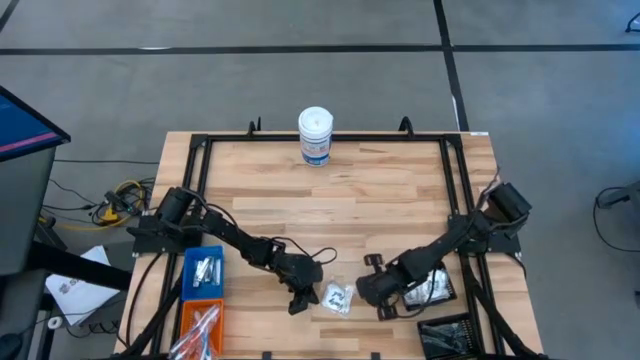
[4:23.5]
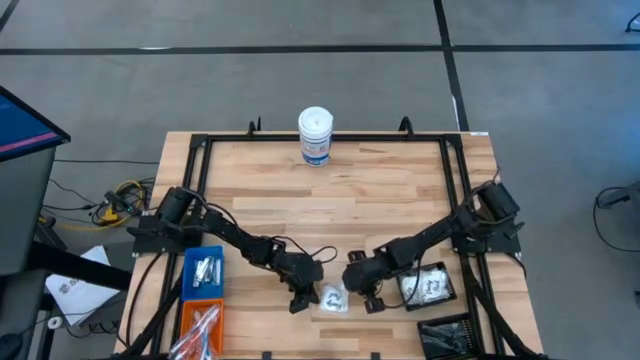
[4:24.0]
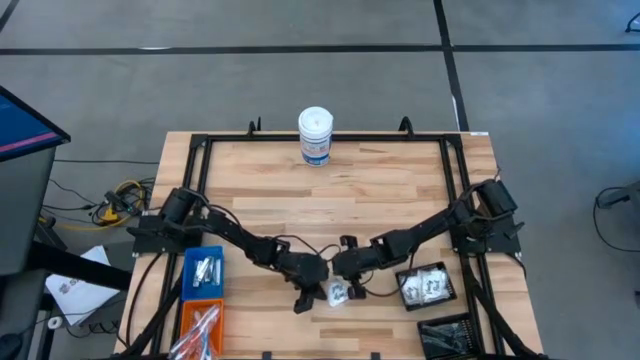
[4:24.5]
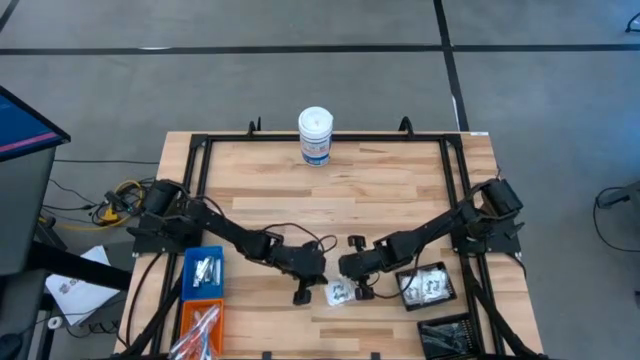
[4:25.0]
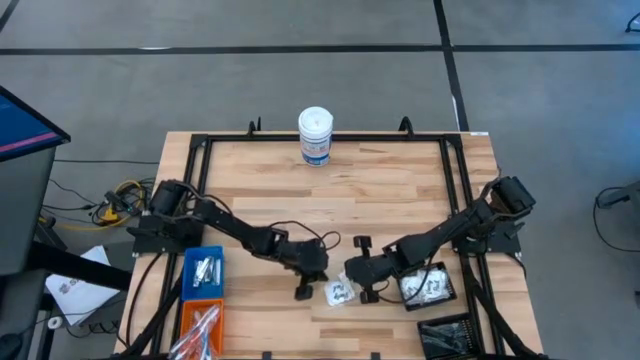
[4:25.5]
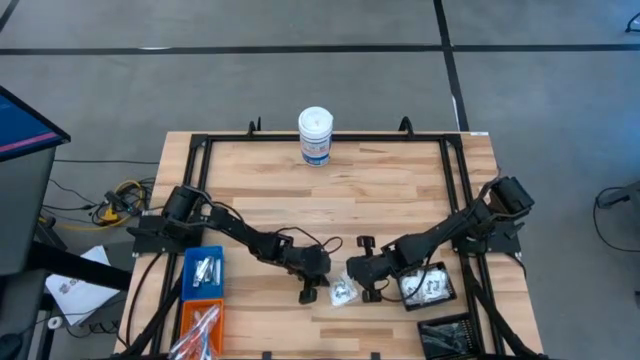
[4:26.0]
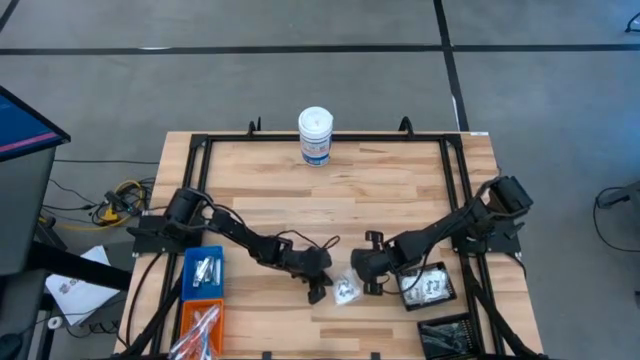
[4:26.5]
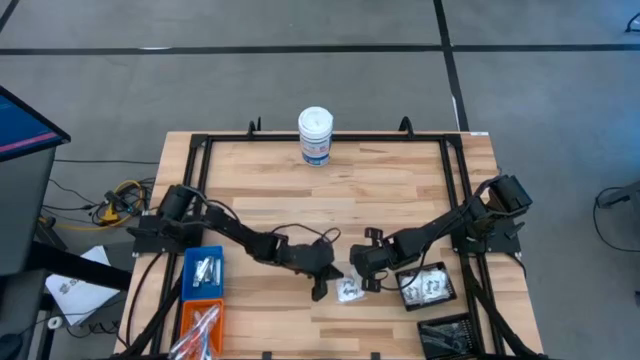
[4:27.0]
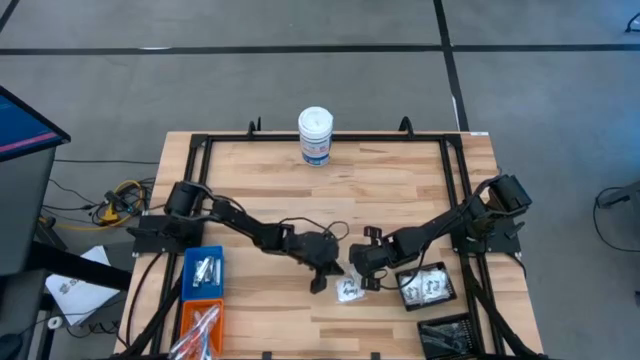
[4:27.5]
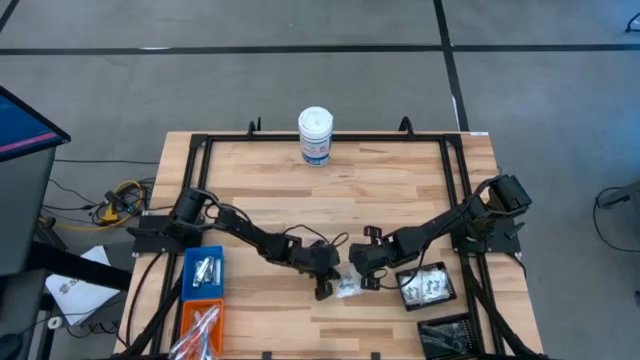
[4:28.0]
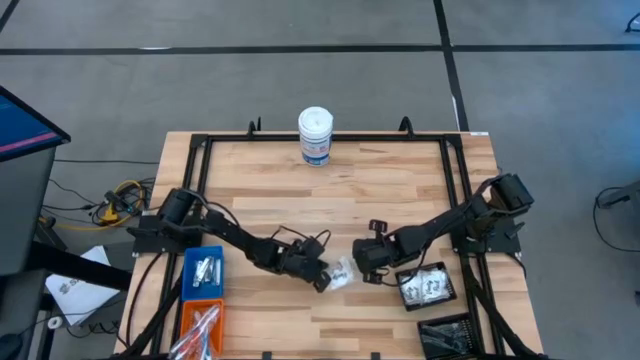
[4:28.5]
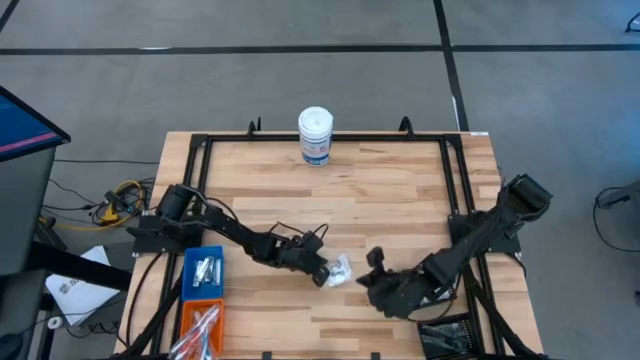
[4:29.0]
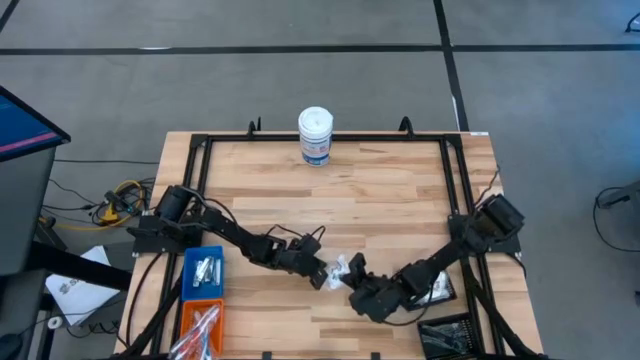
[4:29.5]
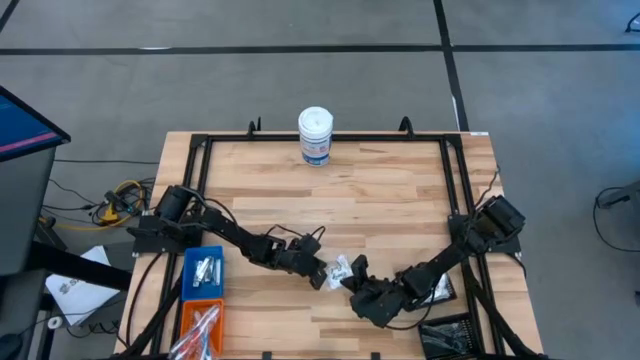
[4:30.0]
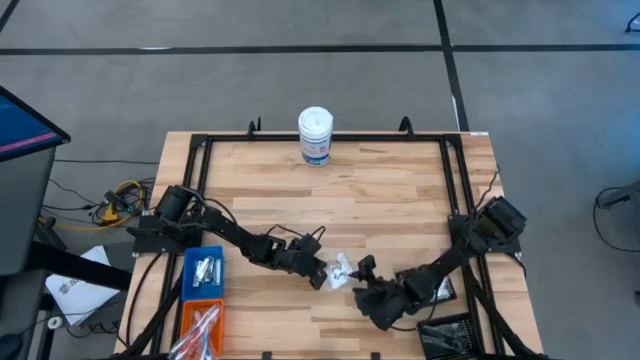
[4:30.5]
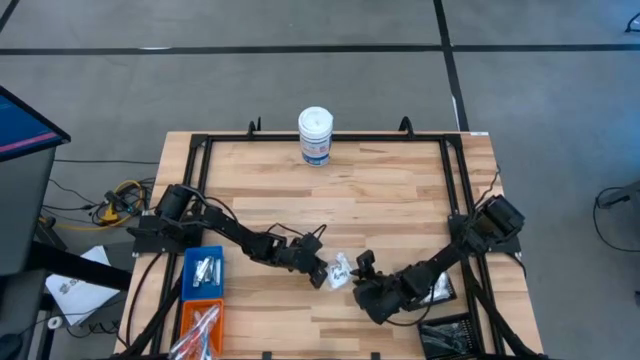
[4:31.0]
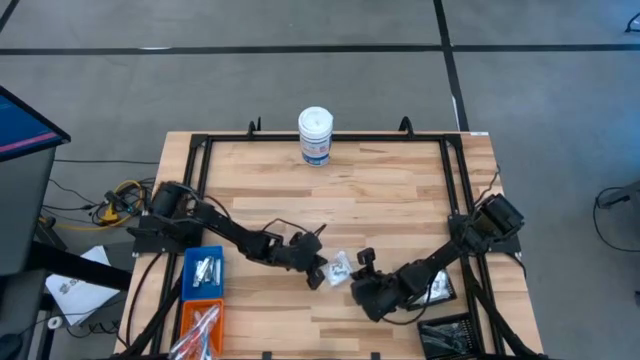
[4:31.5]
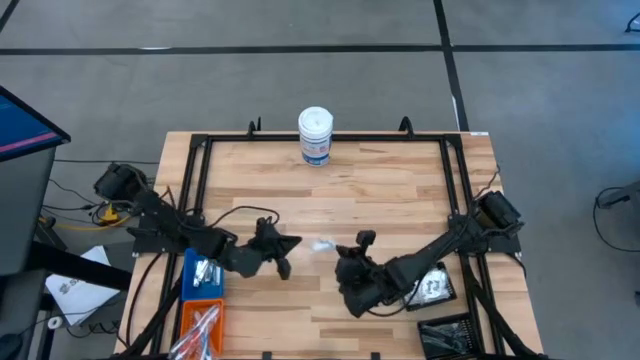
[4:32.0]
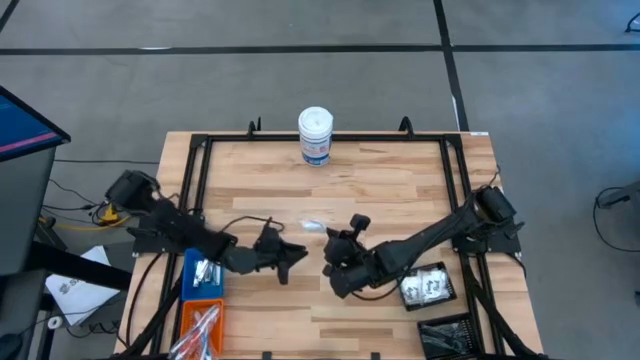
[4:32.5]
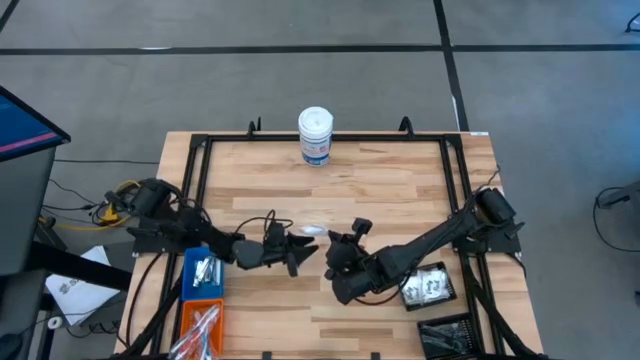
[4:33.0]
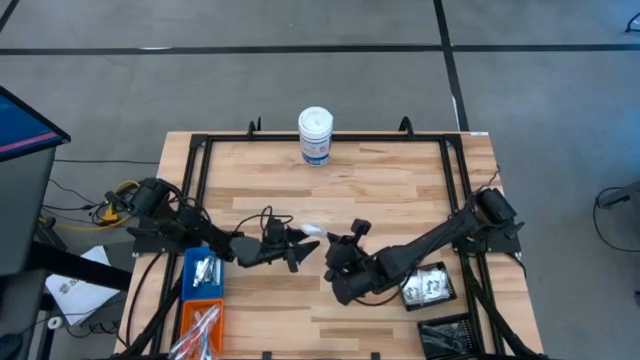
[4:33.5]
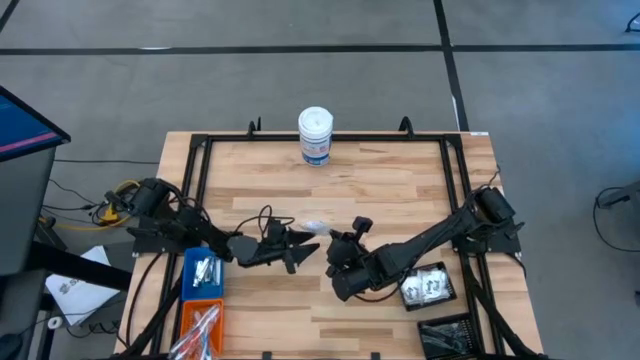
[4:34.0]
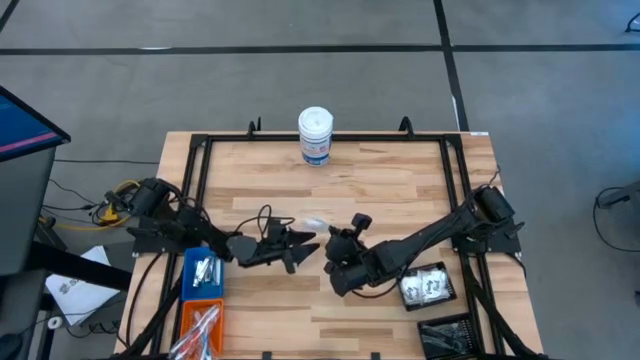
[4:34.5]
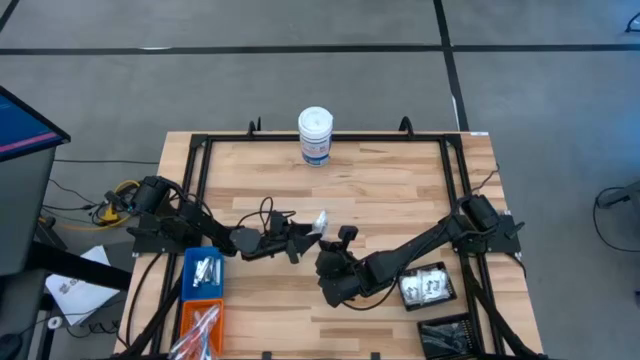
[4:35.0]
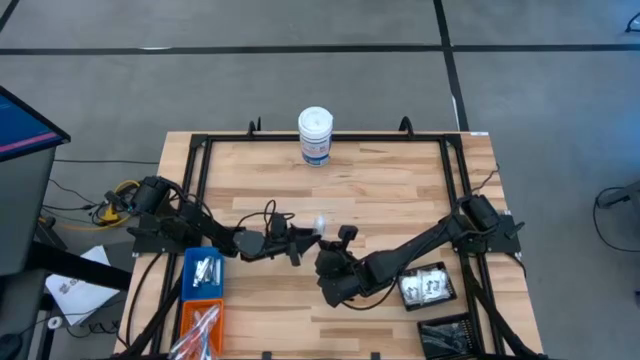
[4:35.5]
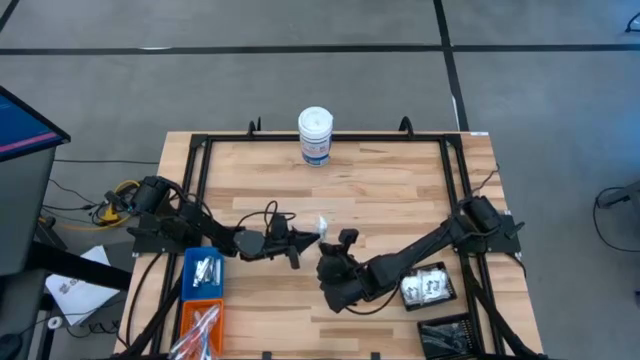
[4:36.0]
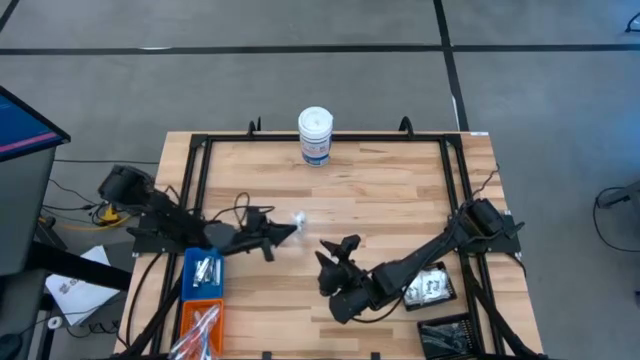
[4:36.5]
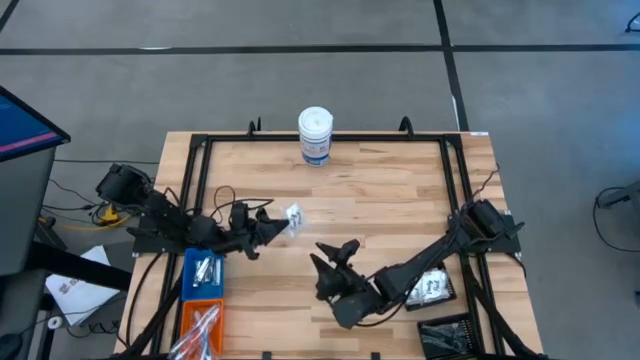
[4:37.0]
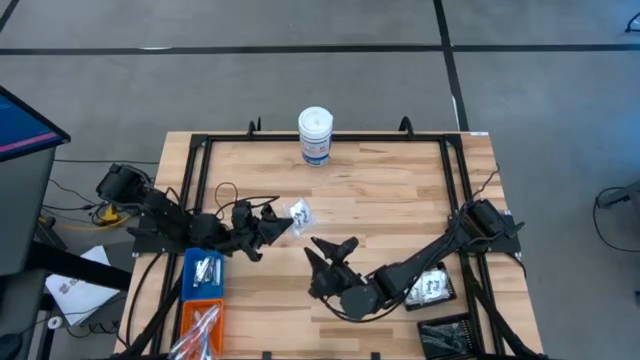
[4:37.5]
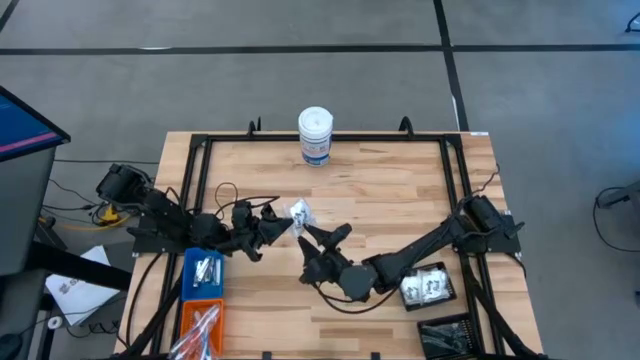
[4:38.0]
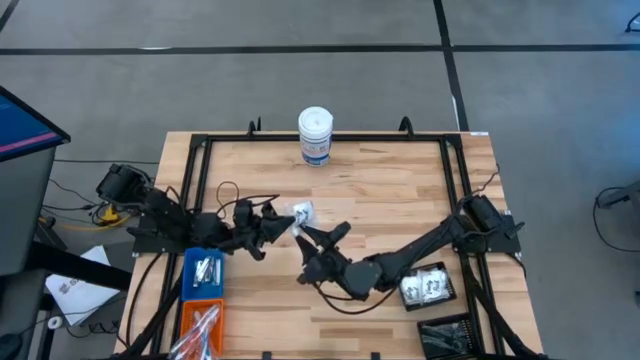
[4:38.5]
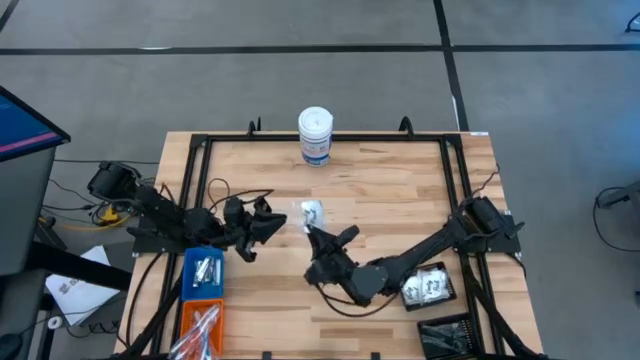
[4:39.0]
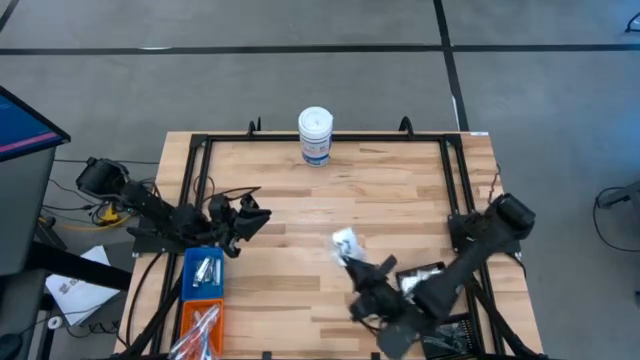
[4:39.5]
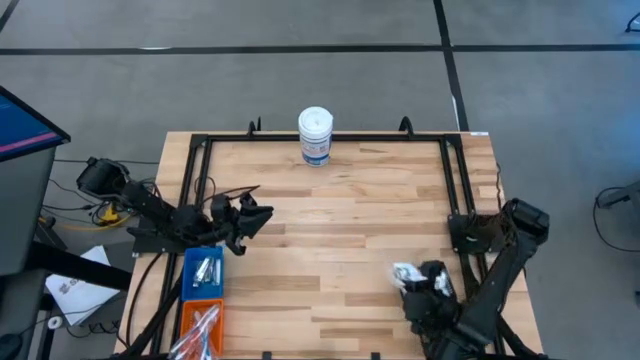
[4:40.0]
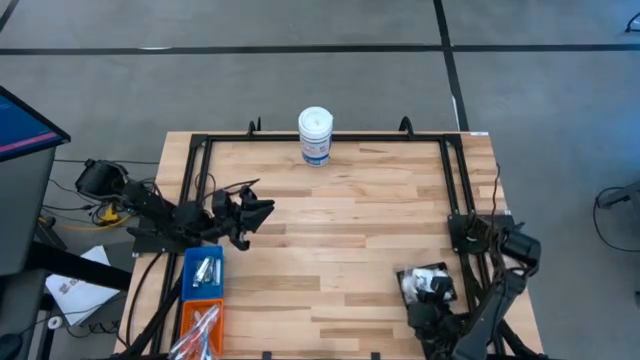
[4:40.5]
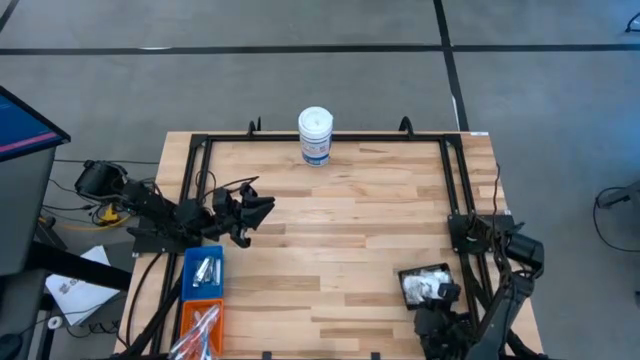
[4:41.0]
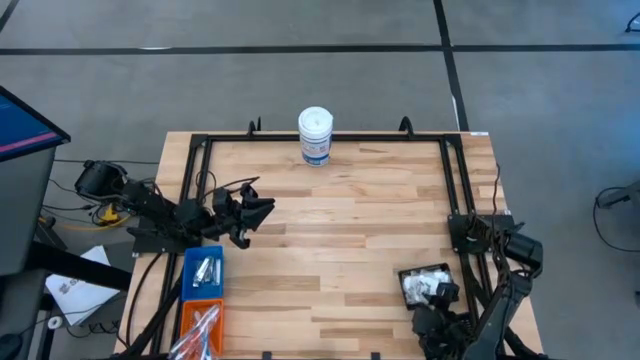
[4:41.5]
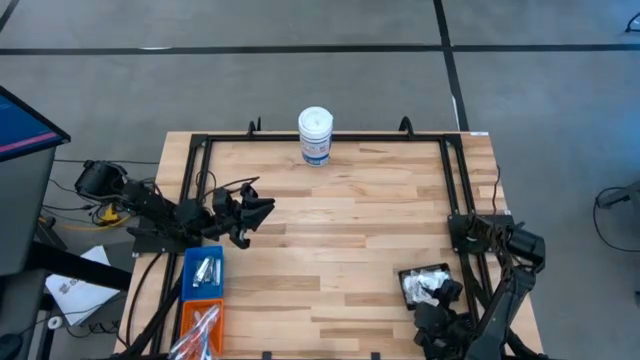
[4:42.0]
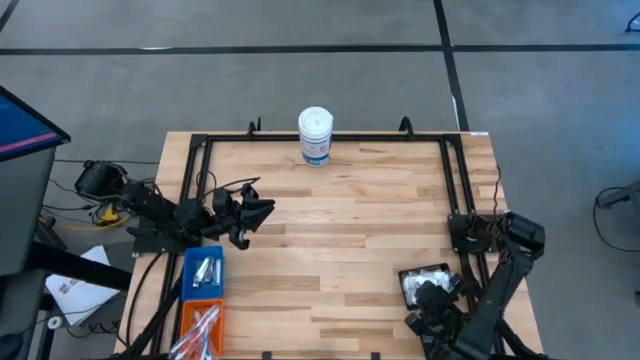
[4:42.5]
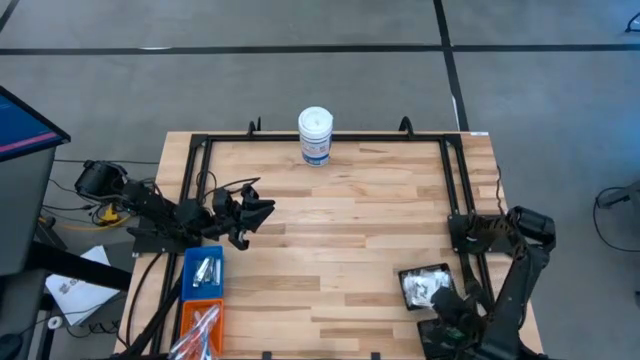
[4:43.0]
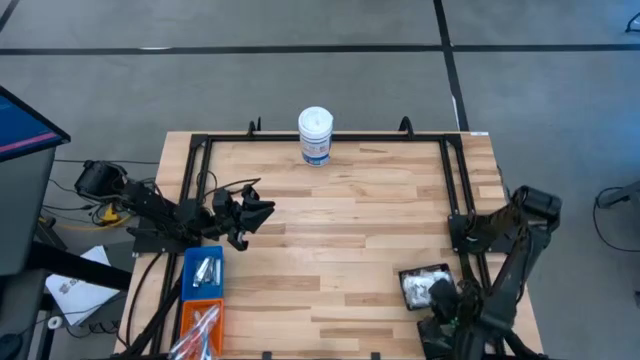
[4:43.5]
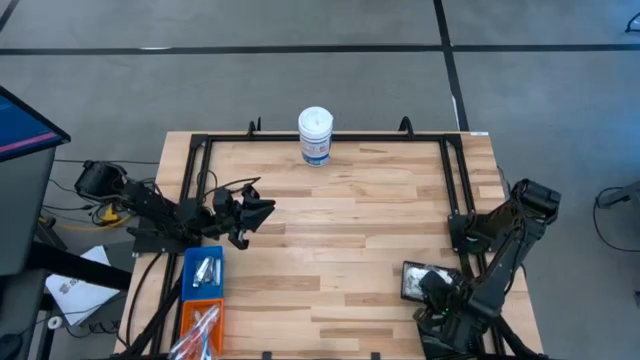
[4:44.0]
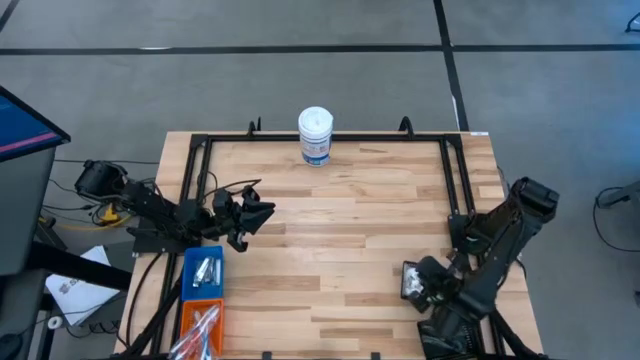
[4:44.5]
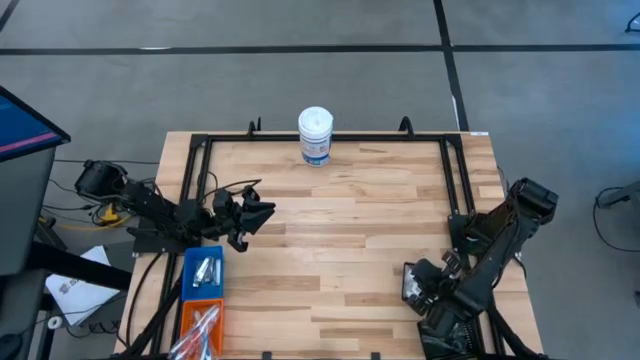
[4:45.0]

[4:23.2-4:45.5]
Task: Pick & Place Travel size toiletries
Put the white cotton swab pack into the top black bin

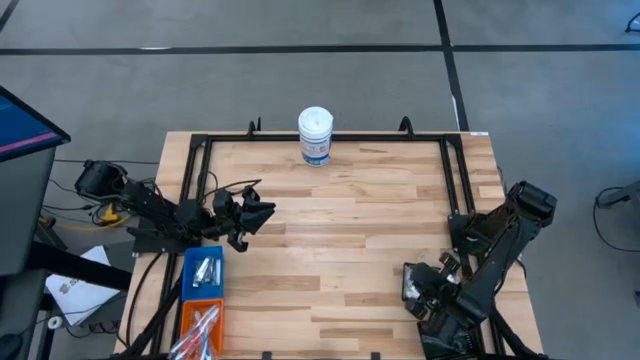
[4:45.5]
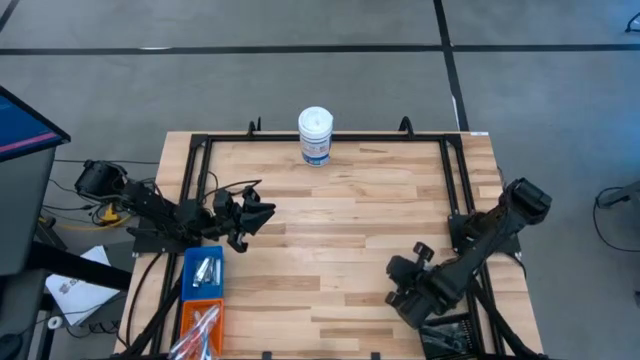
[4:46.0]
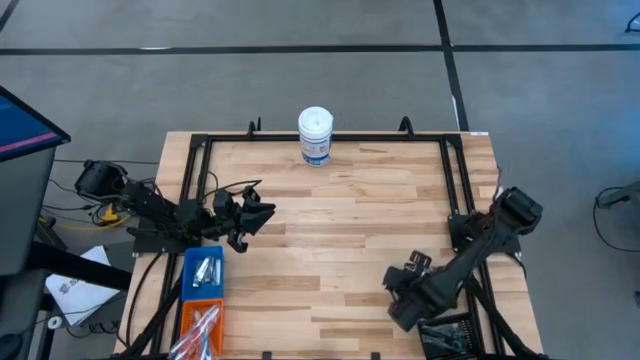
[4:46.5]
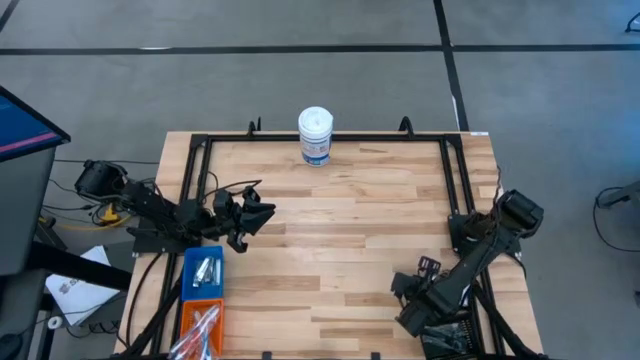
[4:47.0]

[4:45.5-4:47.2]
Adjust the top black bin
